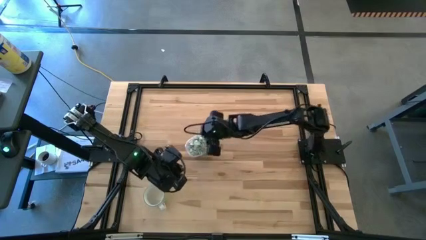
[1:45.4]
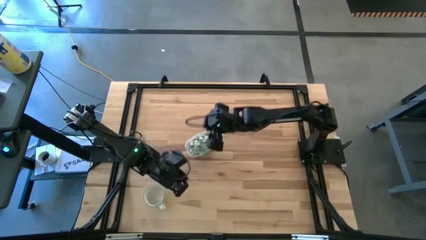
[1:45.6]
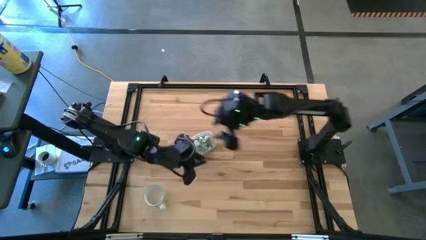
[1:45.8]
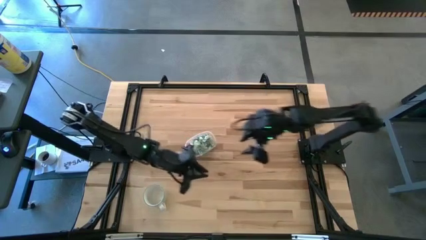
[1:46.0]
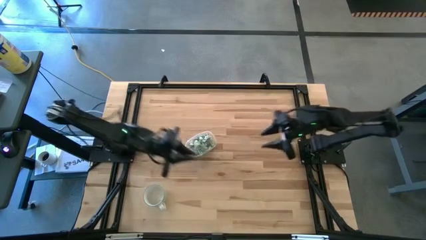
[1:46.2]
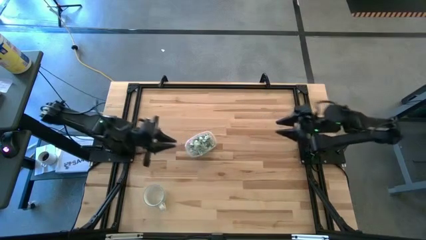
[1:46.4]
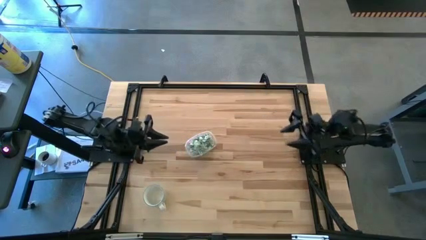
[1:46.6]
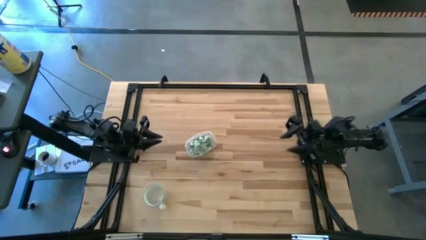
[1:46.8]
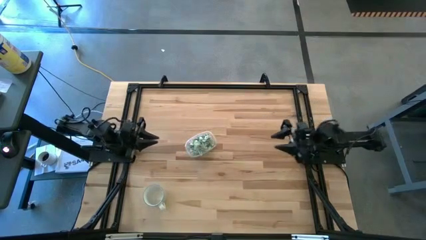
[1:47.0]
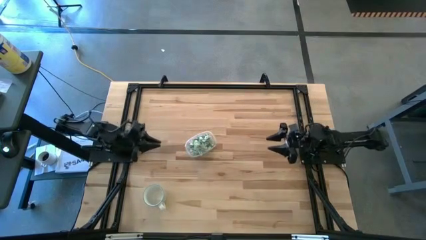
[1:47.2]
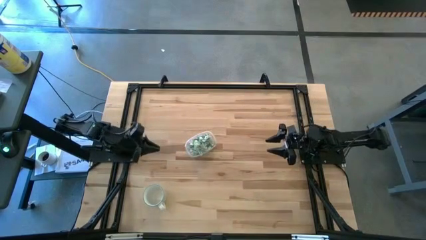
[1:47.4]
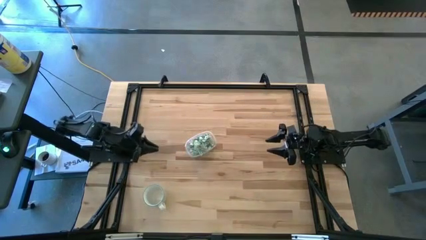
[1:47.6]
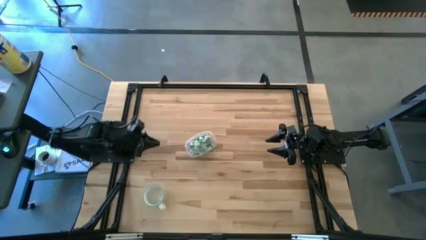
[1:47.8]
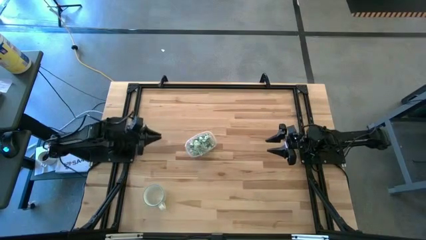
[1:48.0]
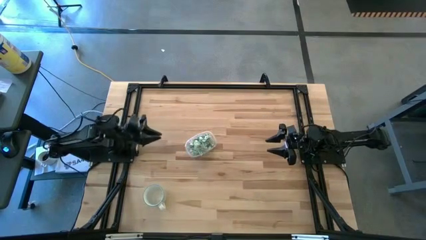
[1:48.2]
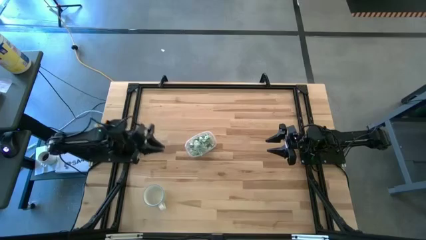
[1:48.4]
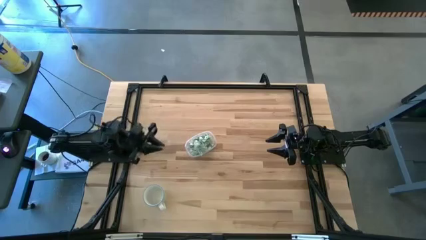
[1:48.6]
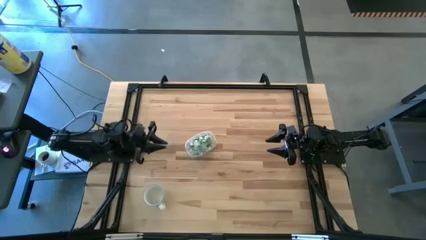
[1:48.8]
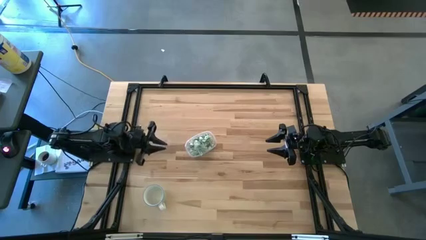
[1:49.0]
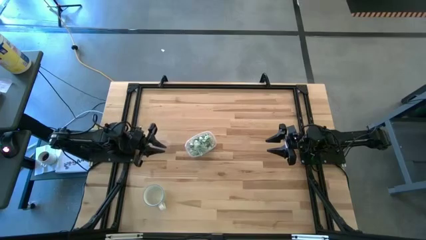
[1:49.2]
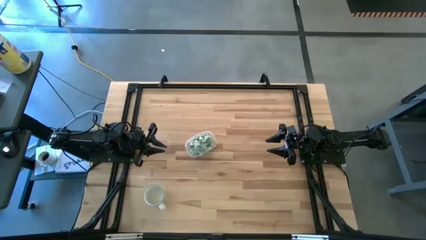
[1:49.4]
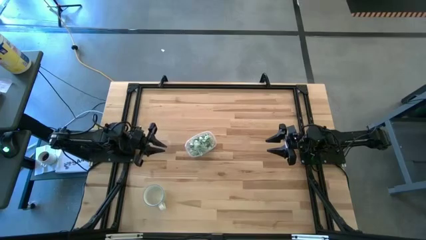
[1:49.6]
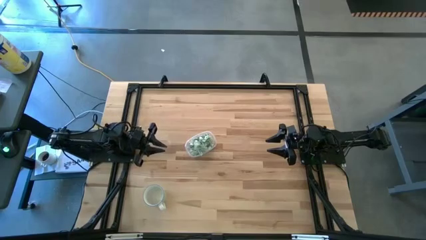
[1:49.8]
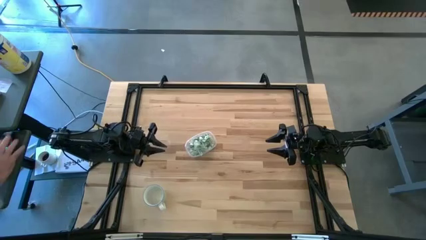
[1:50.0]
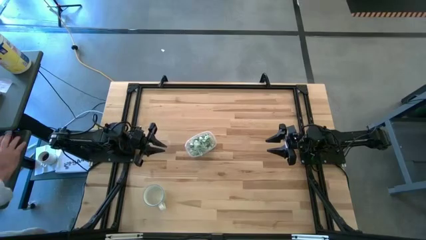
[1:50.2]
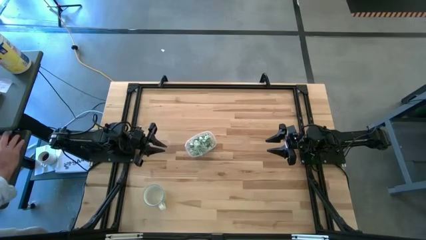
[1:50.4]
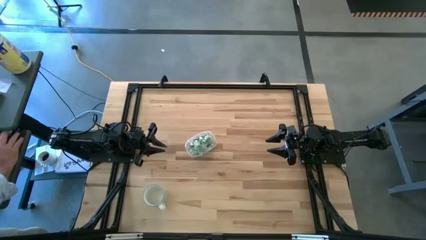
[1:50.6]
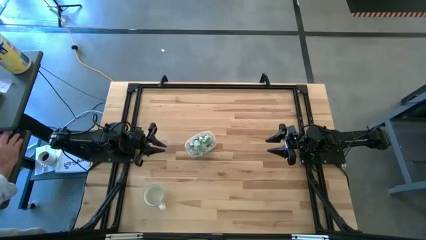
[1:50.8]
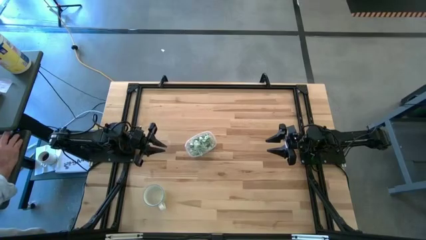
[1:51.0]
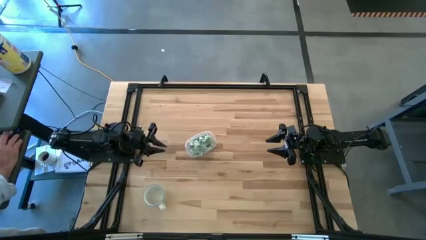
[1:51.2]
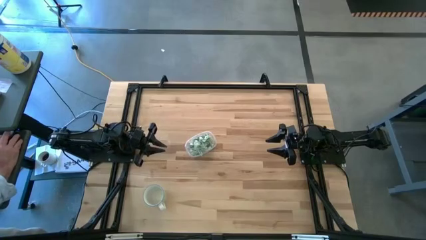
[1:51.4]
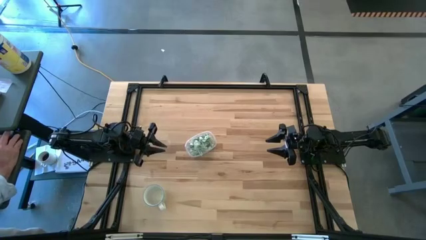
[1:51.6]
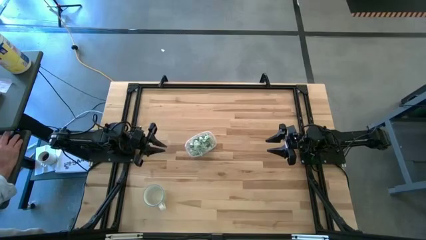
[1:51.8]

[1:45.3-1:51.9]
Task: Pick and place Stevia / Truvia into bins
Return to Home Position

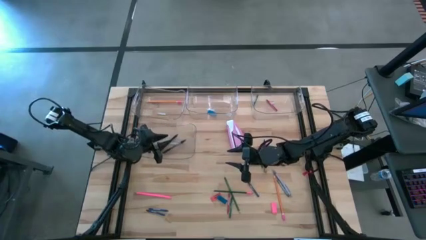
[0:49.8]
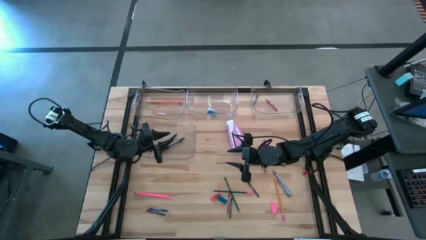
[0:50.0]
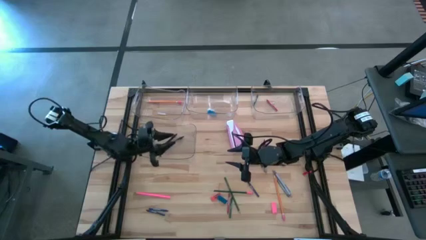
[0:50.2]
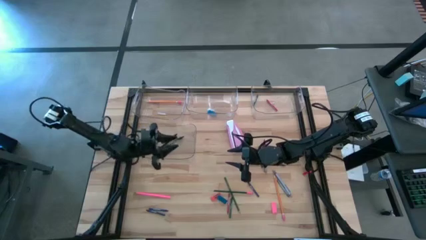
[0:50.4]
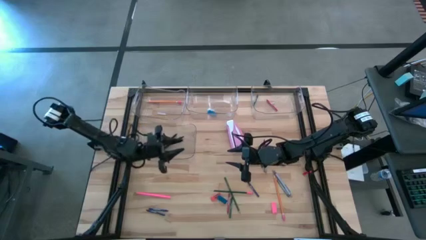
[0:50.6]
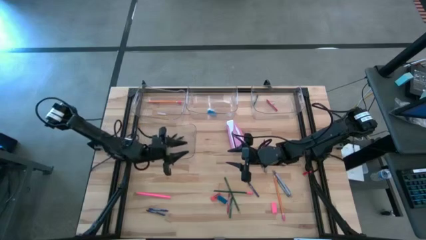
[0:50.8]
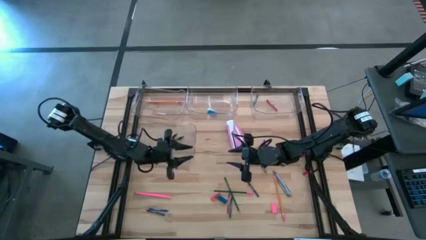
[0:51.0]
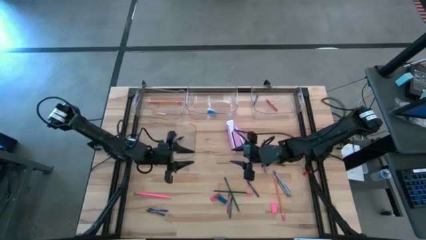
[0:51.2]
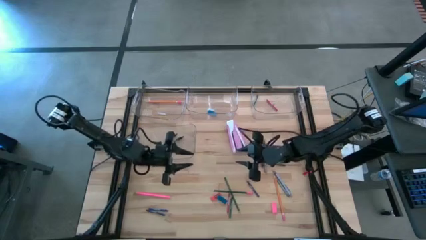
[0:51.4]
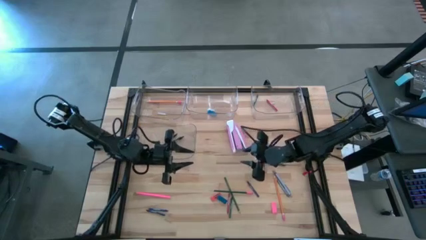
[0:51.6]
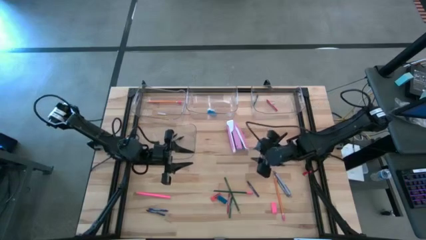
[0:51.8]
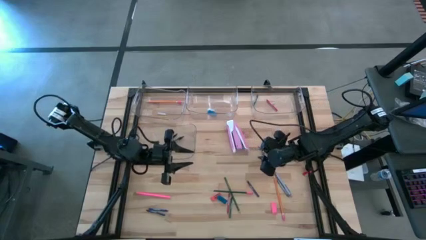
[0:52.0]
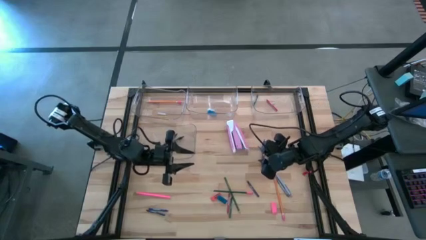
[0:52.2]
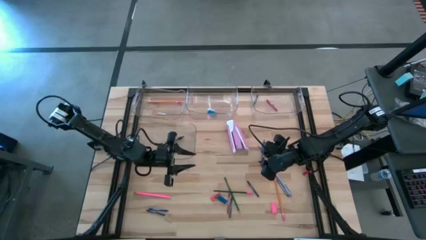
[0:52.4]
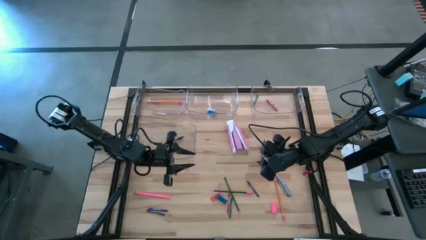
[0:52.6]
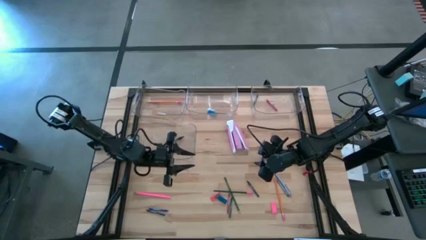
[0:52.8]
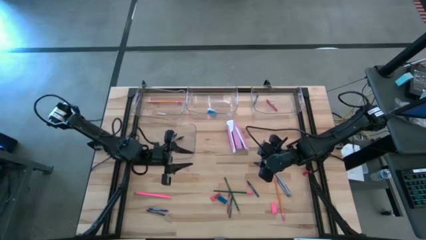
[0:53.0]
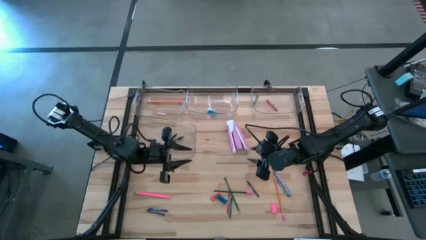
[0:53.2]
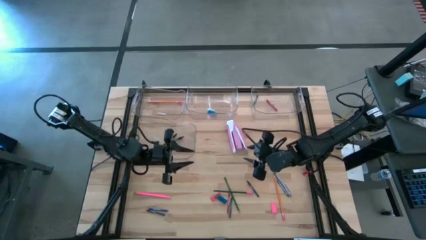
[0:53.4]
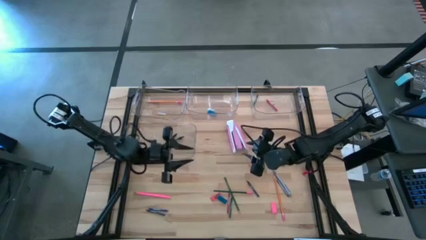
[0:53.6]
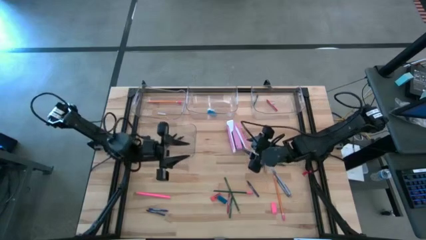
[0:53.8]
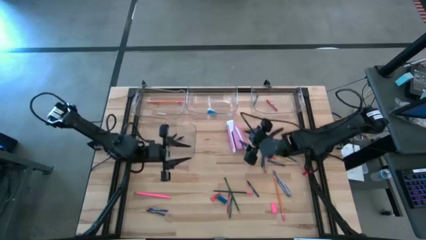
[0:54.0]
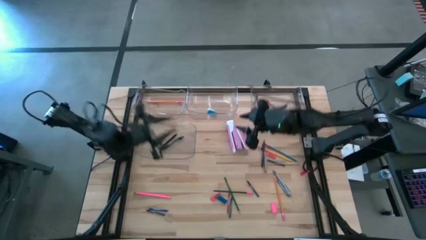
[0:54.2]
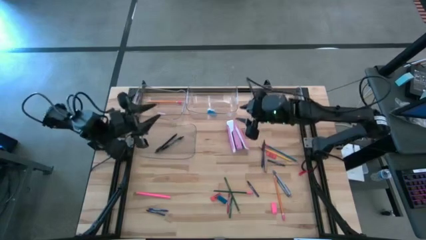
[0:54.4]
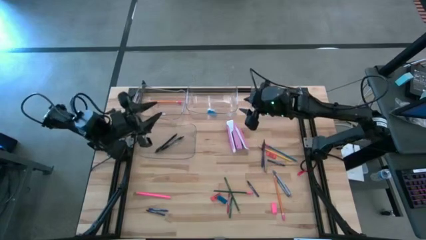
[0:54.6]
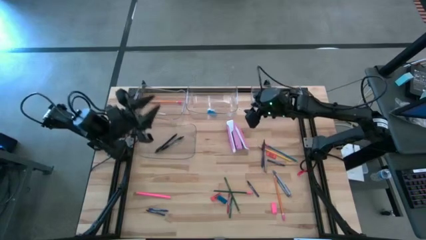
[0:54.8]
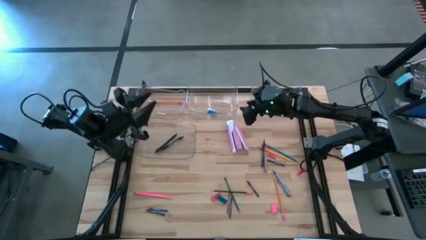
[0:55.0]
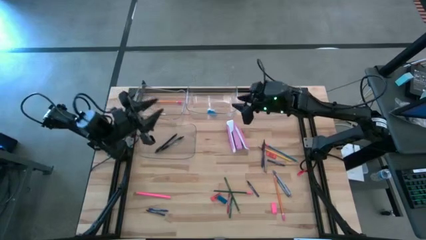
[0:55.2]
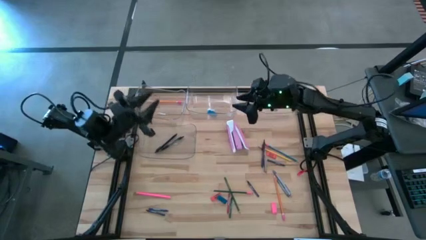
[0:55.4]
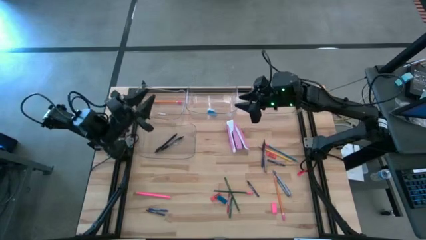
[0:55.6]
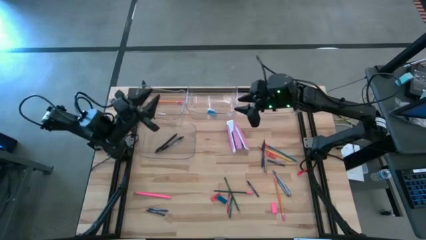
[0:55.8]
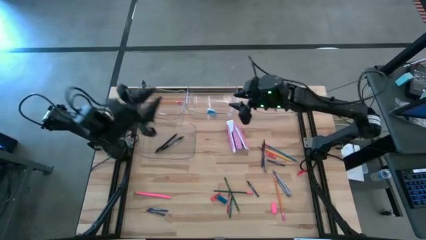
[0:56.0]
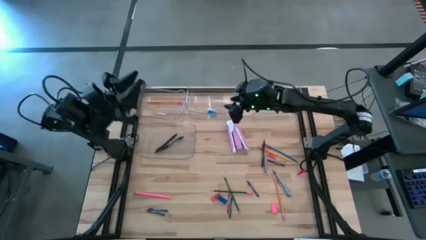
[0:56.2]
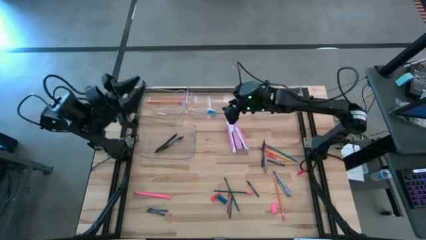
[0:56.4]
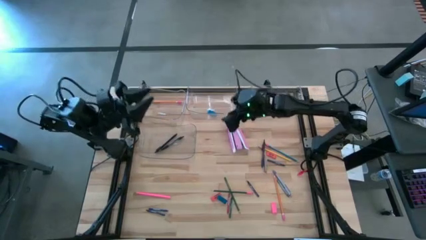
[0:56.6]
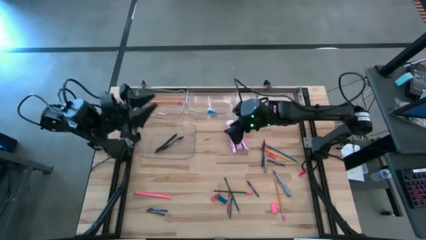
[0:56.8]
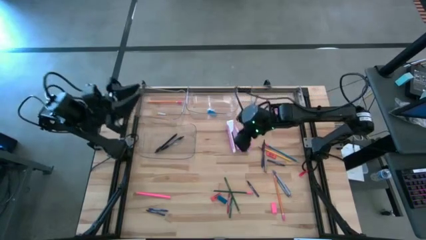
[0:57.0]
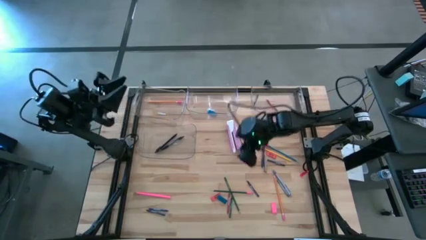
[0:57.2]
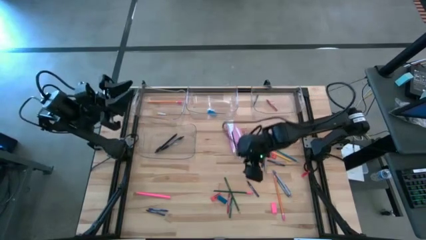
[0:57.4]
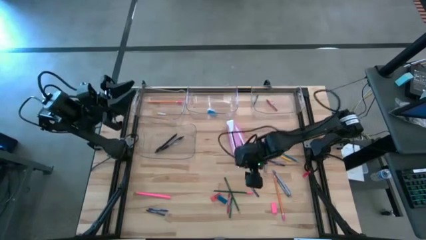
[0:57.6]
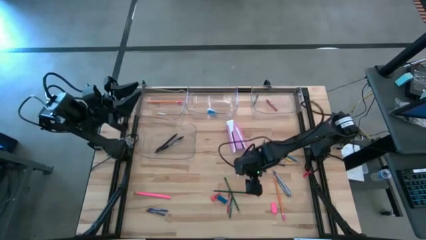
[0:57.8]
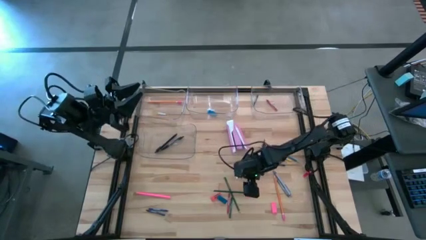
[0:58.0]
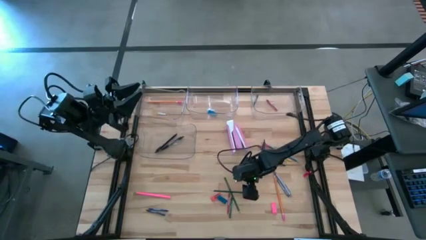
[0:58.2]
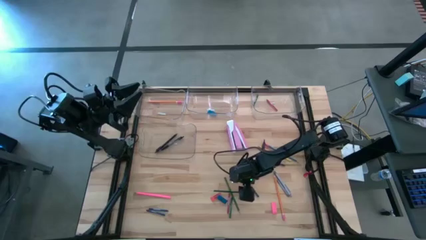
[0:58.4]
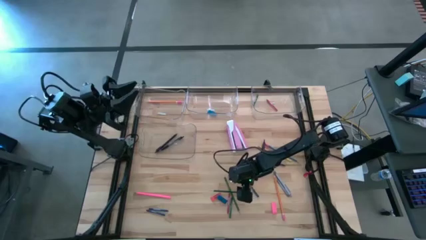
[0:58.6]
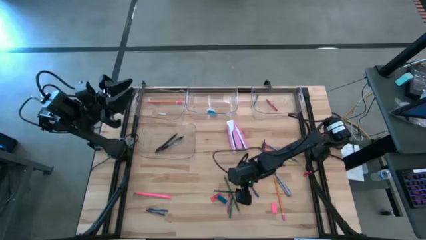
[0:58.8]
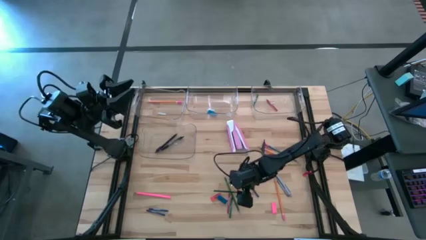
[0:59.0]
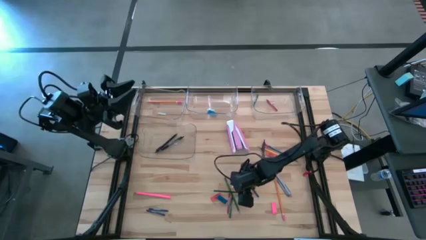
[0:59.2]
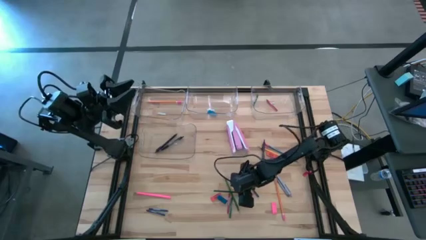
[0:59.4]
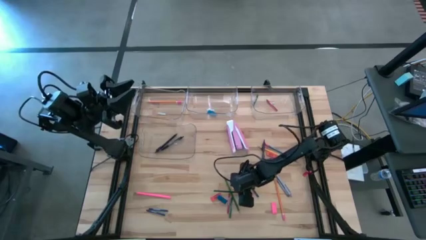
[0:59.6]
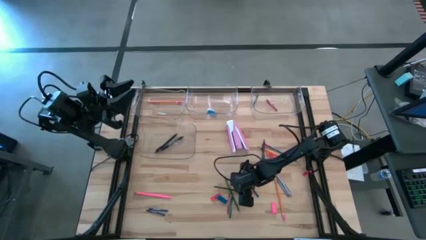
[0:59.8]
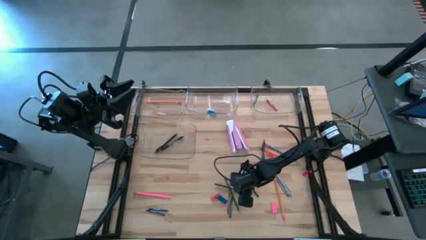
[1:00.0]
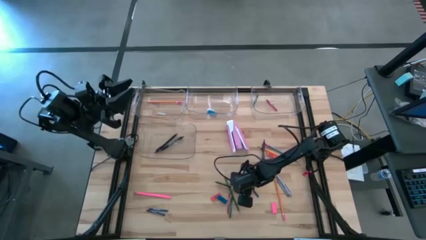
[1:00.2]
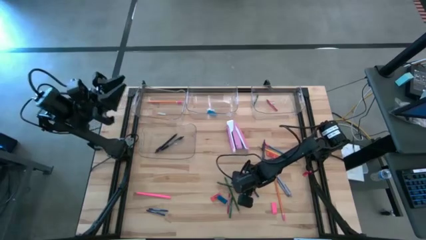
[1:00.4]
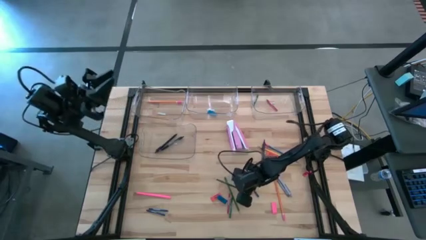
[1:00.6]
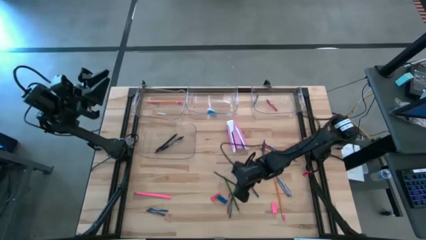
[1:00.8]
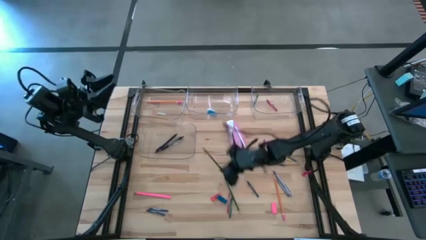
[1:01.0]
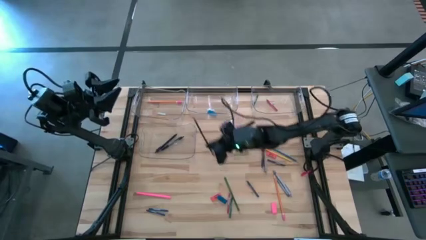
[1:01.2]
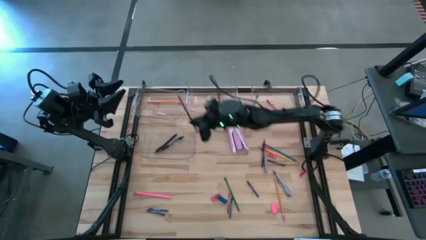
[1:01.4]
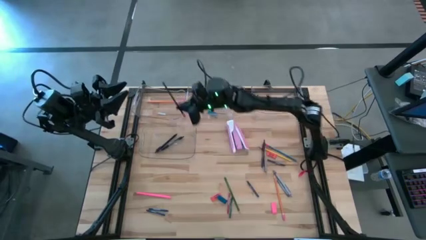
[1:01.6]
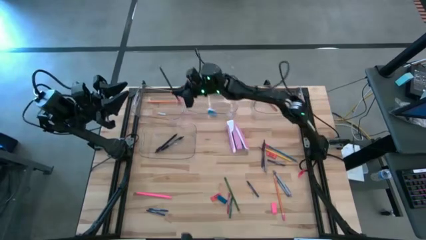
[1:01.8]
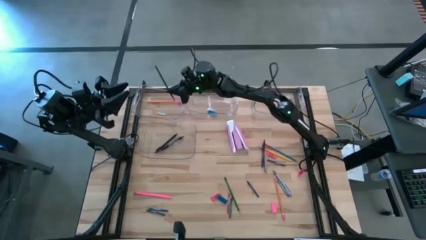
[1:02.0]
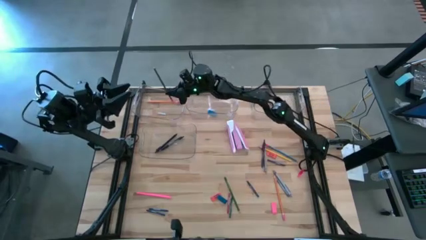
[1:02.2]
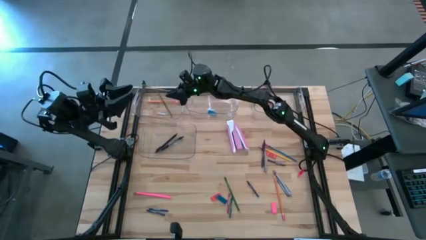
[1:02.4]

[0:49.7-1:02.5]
Task: Sort crayons/erasers/pens/pencils in bins
Put the green pencil into the top left transparent bin
